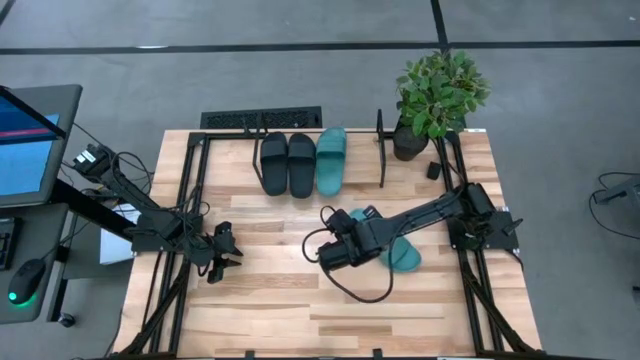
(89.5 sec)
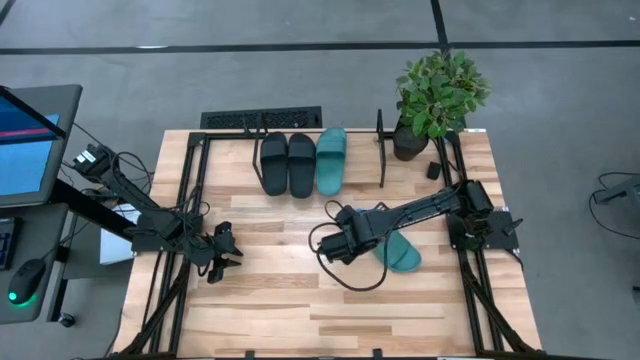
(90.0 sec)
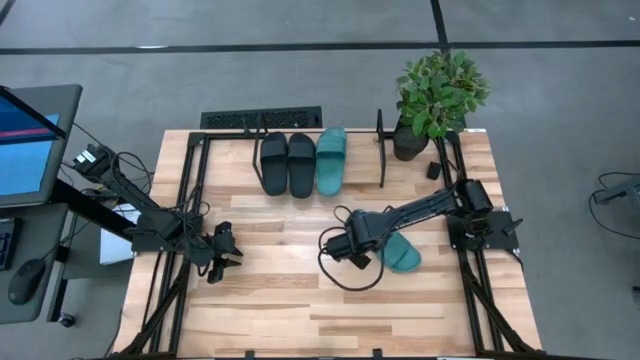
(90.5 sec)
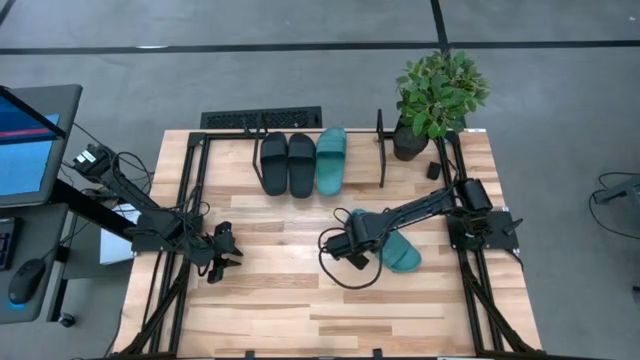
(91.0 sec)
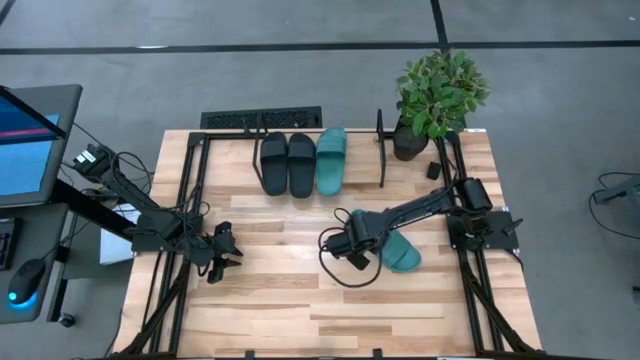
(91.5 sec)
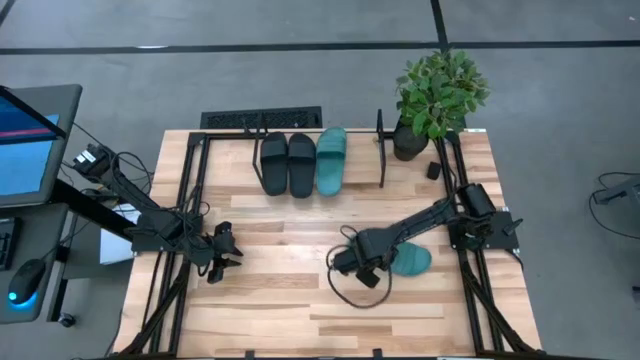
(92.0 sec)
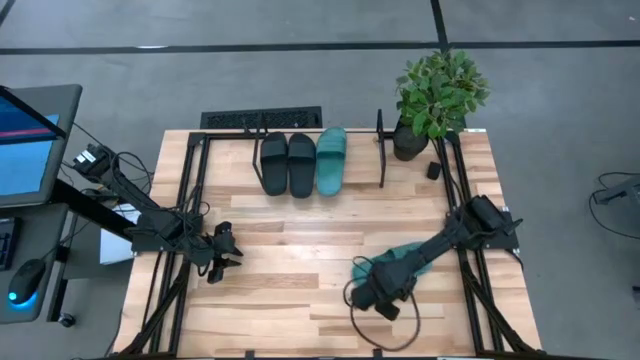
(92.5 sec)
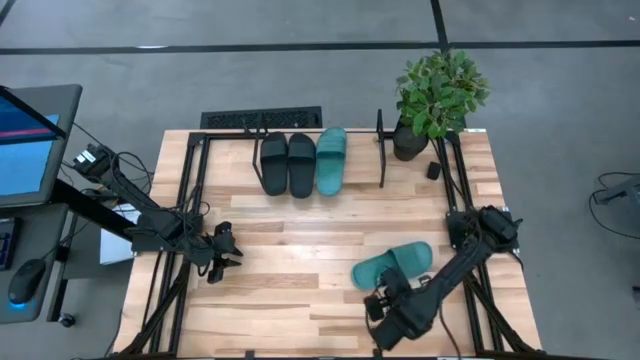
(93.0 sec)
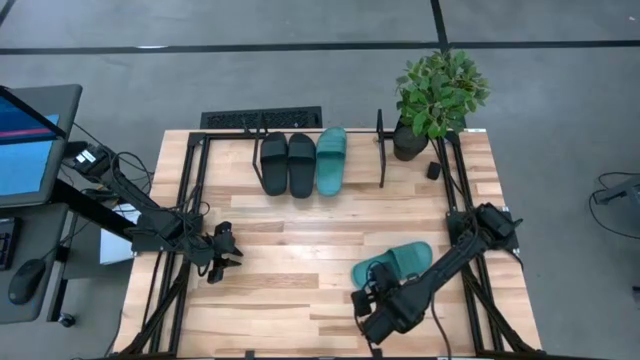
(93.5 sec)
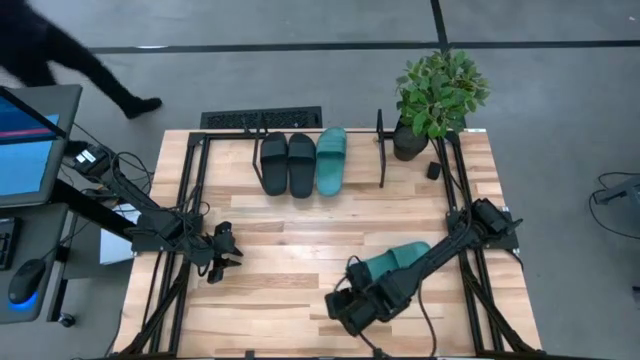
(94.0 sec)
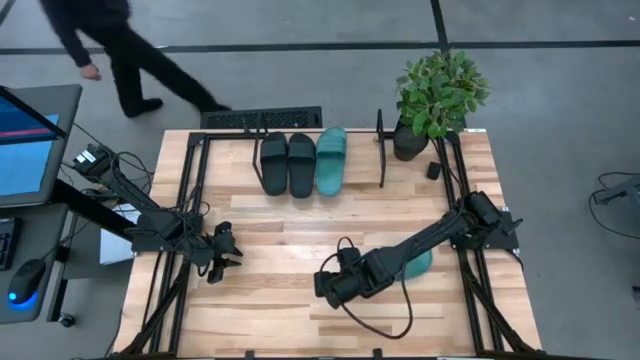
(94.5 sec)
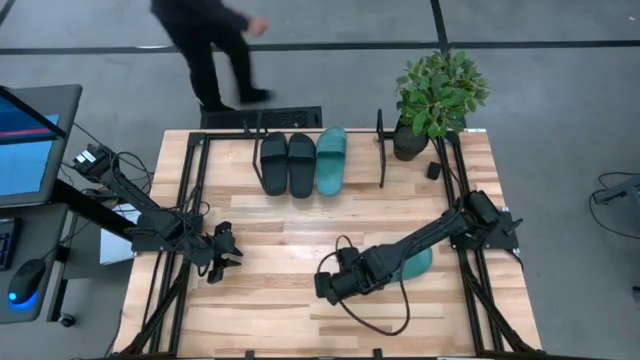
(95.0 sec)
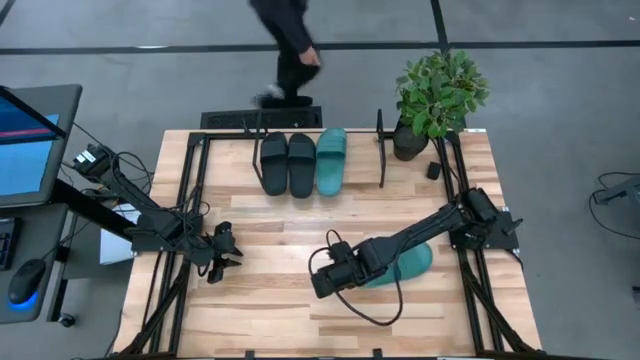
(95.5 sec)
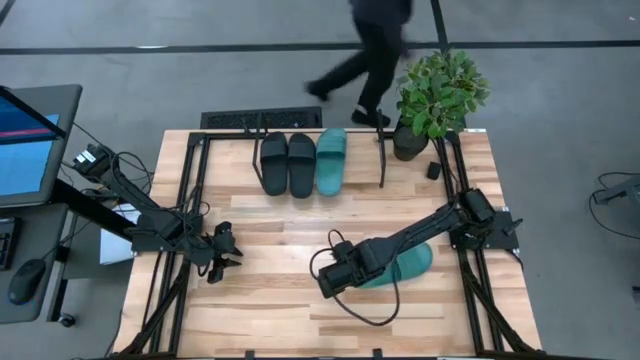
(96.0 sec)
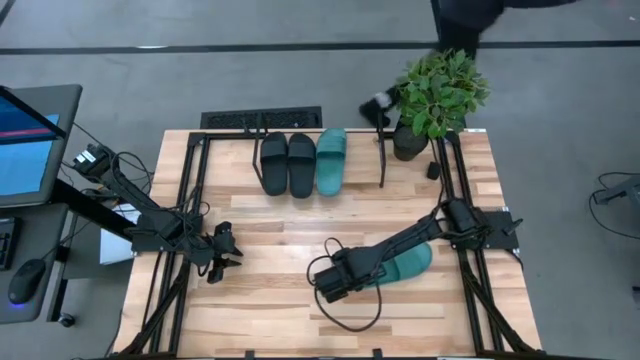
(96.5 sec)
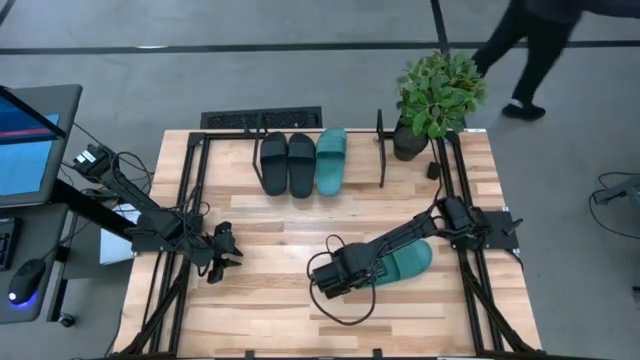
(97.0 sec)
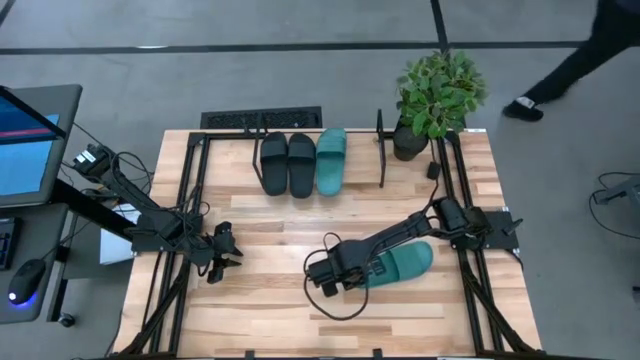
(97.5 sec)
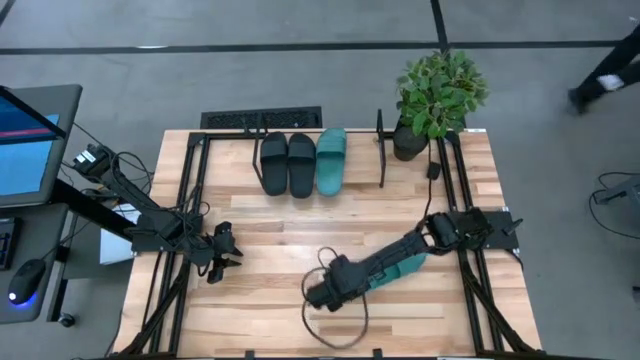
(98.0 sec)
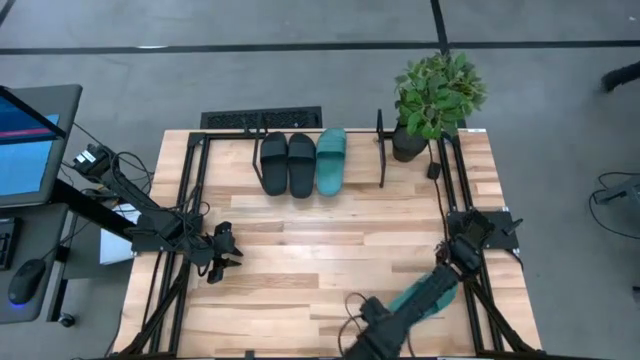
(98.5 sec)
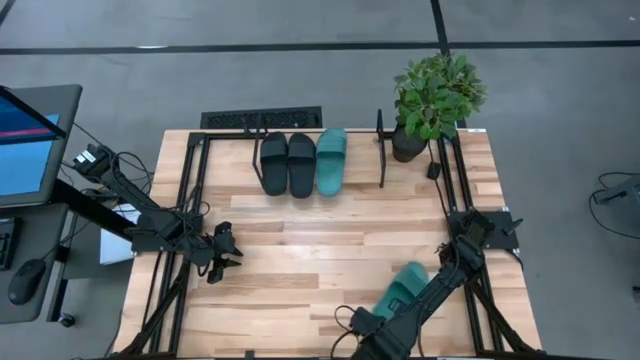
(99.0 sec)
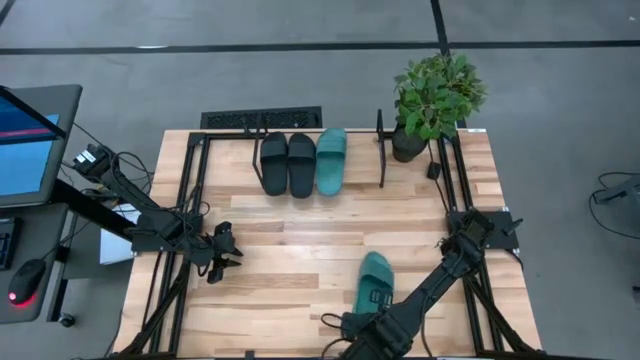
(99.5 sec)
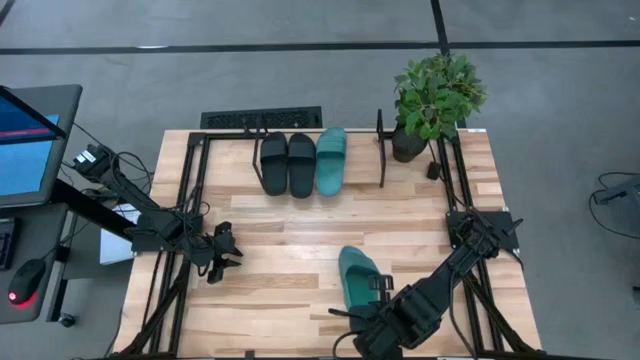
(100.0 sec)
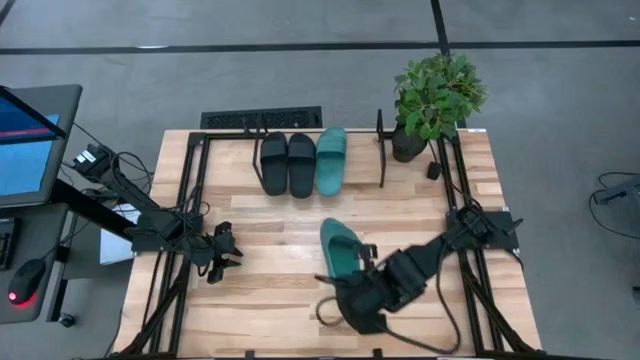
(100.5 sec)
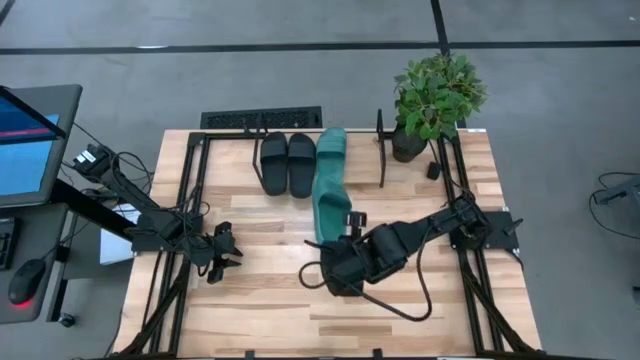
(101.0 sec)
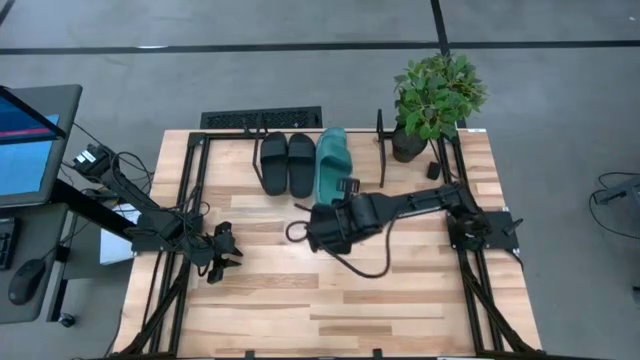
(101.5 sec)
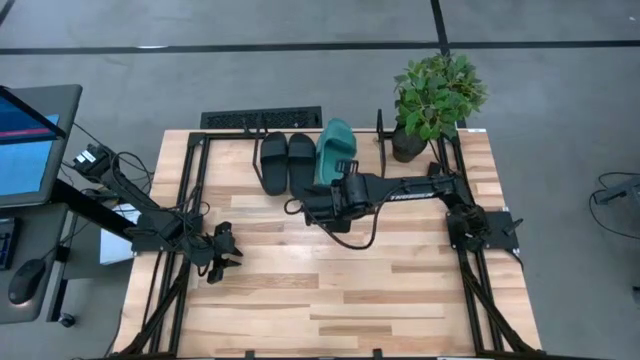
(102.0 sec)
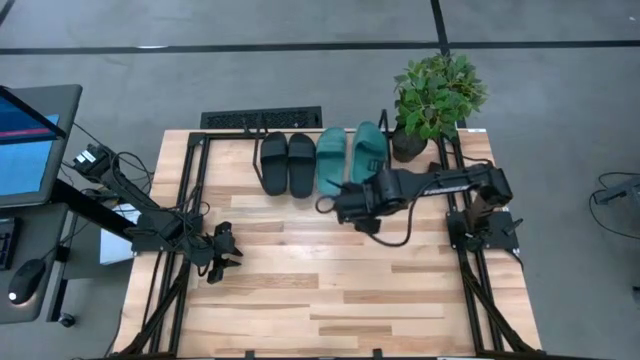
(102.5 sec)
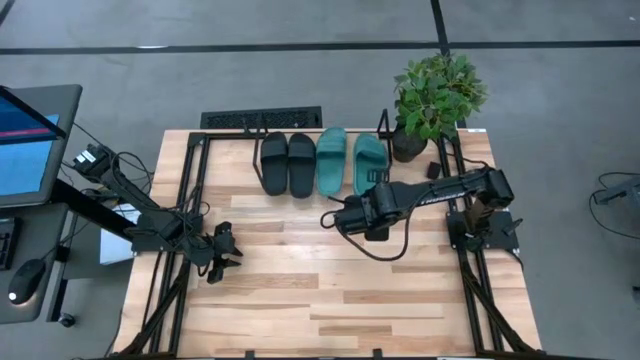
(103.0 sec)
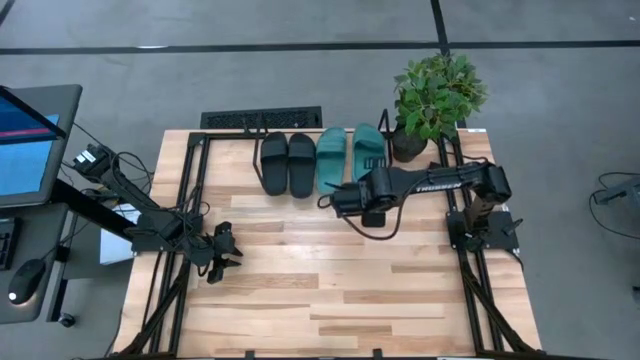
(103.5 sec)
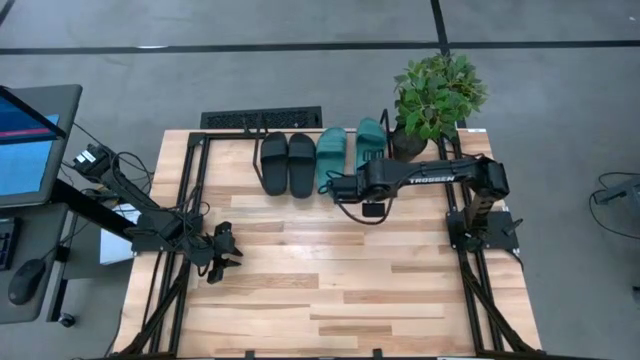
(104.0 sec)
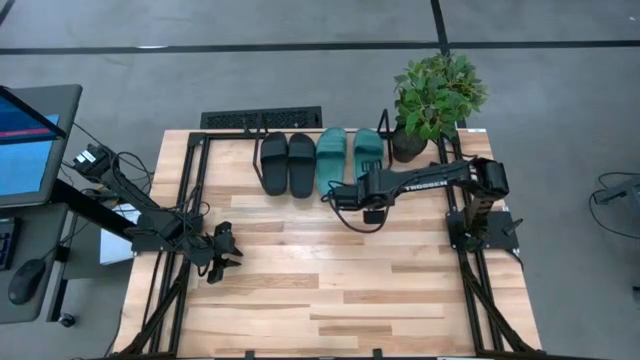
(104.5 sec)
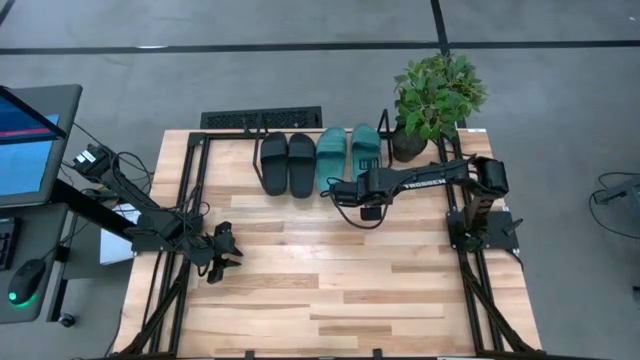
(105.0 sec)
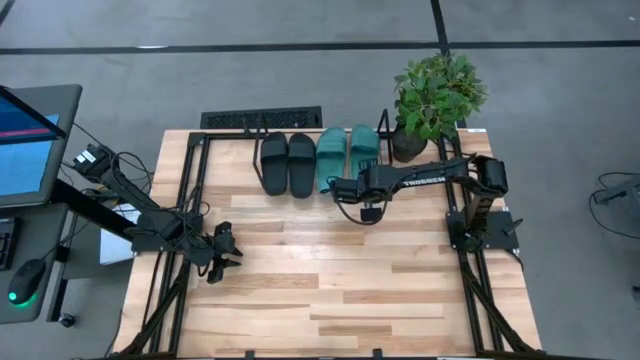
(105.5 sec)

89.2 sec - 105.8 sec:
Task: Pick and place slides into the shelf
Put green slide on the shelf

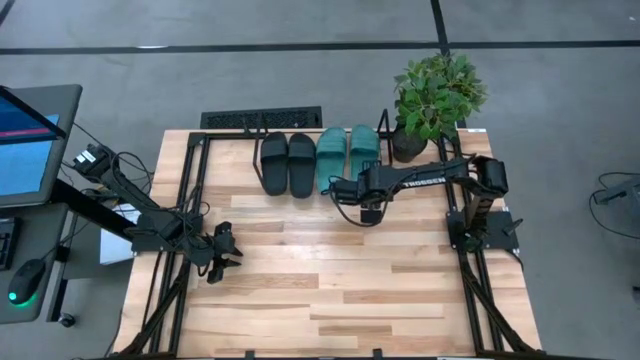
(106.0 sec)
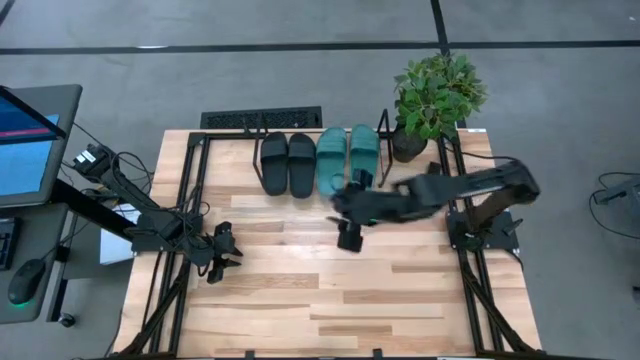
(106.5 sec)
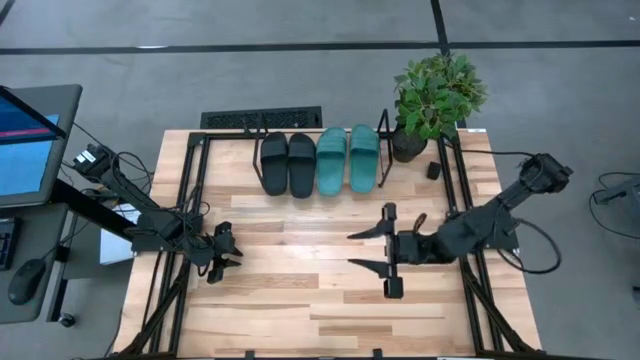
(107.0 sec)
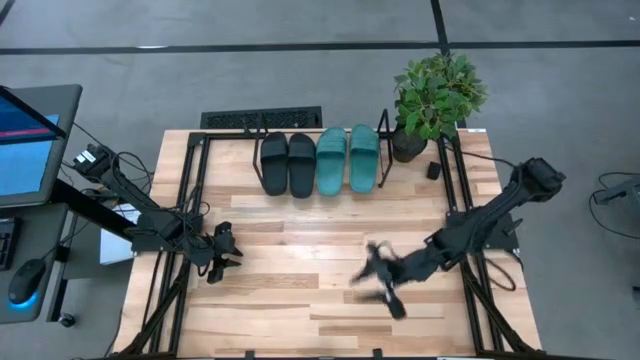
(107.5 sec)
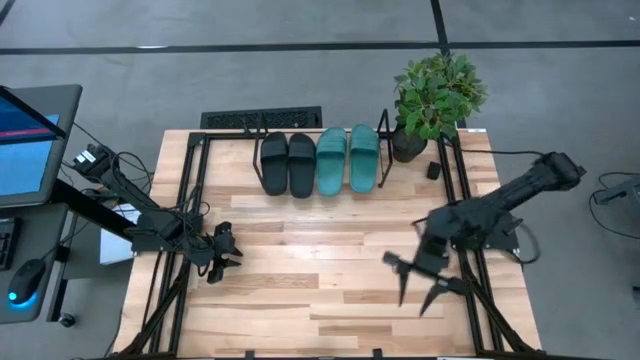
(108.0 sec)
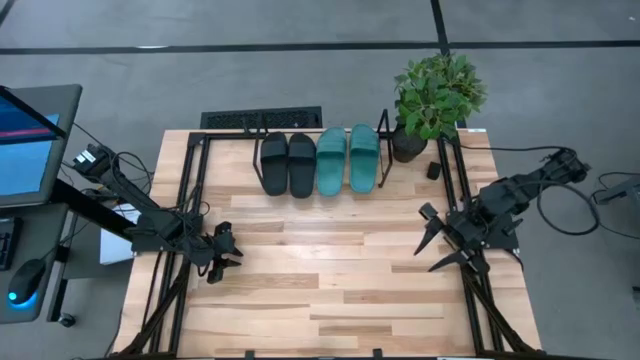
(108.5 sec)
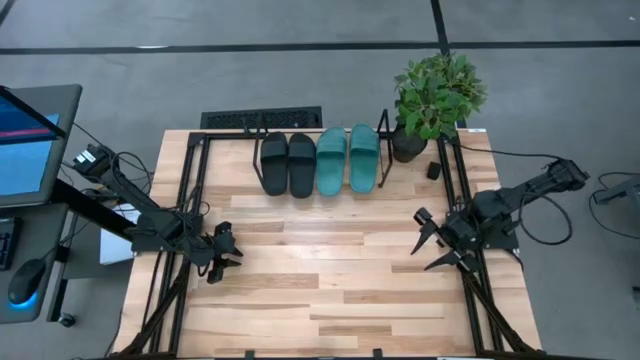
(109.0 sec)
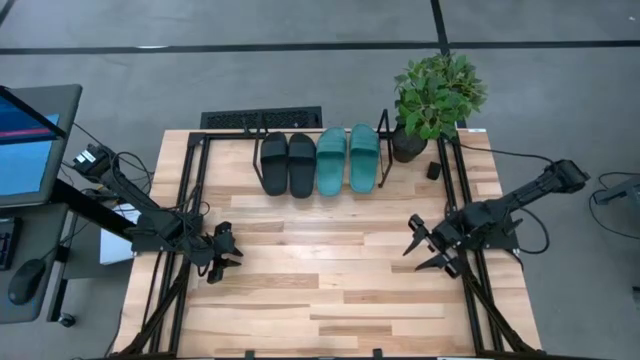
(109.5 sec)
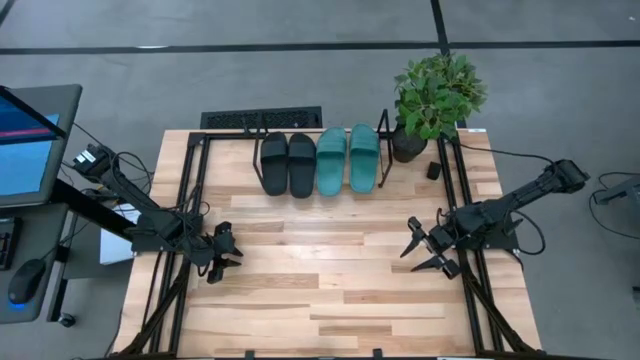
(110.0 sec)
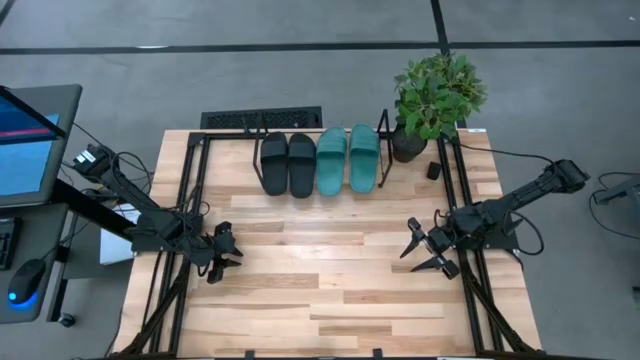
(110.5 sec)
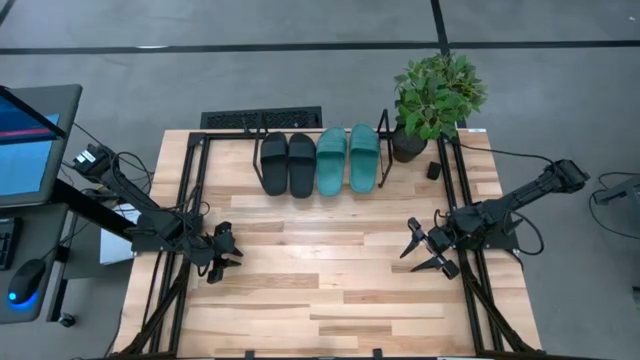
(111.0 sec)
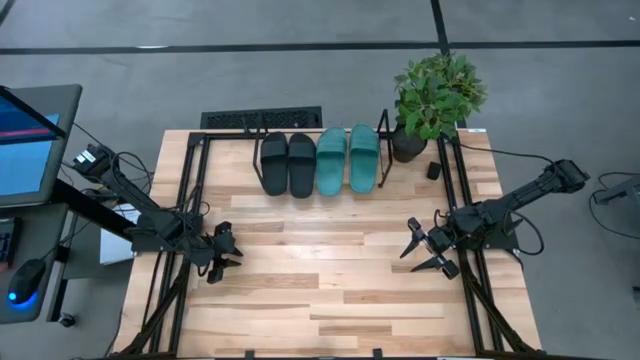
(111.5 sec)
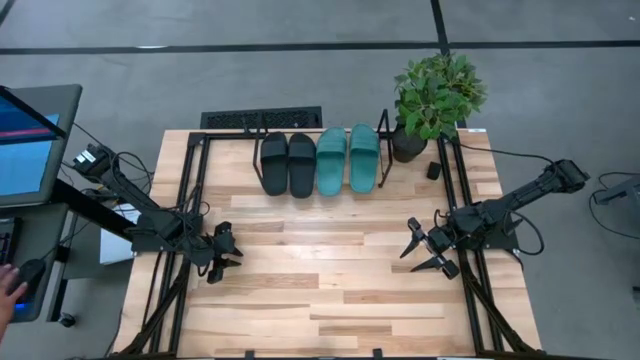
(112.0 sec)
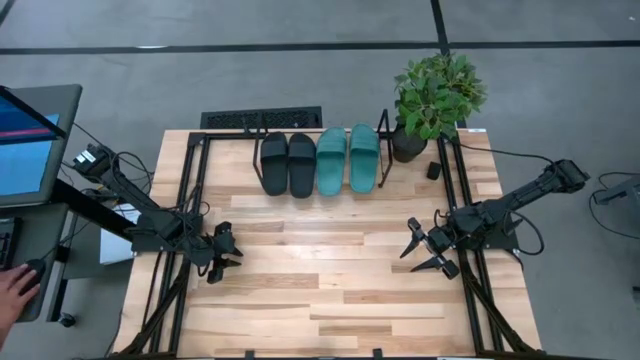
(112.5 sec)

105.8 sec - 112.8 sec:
Return to Home Position
